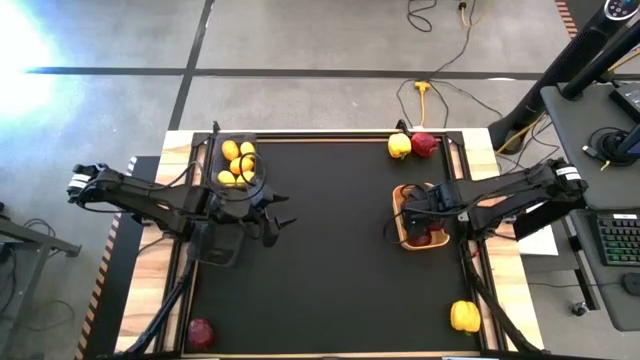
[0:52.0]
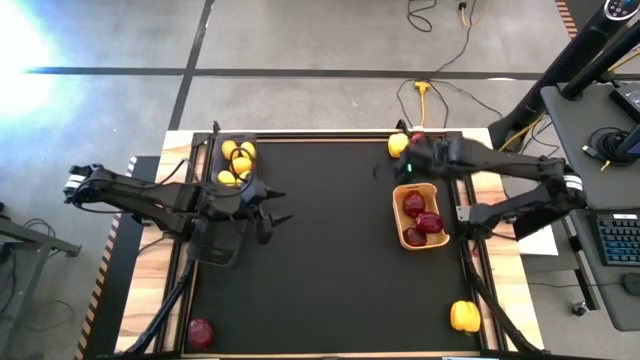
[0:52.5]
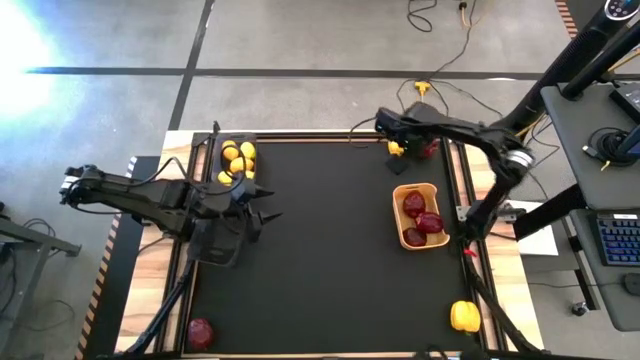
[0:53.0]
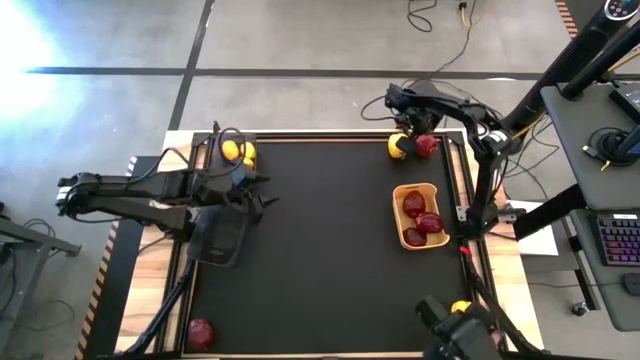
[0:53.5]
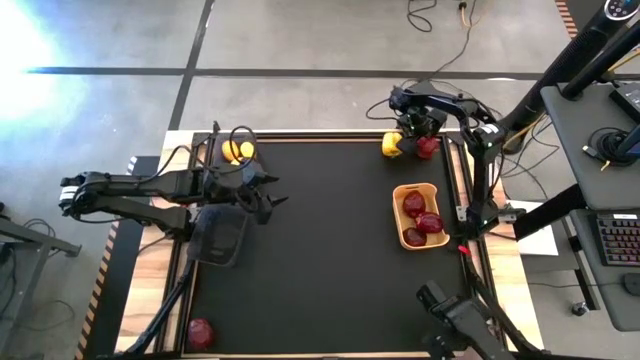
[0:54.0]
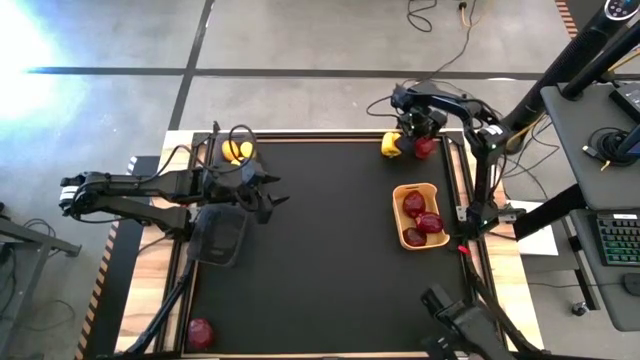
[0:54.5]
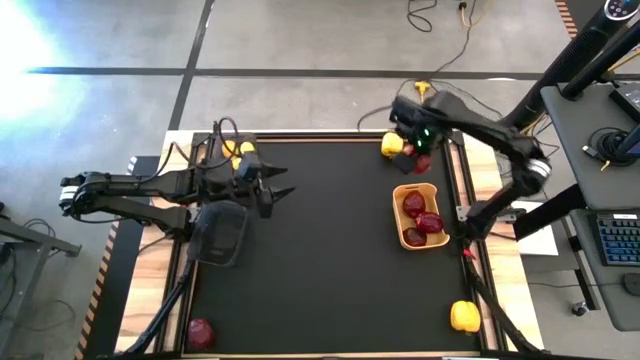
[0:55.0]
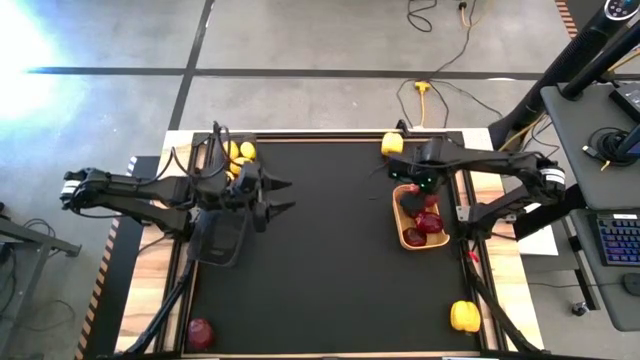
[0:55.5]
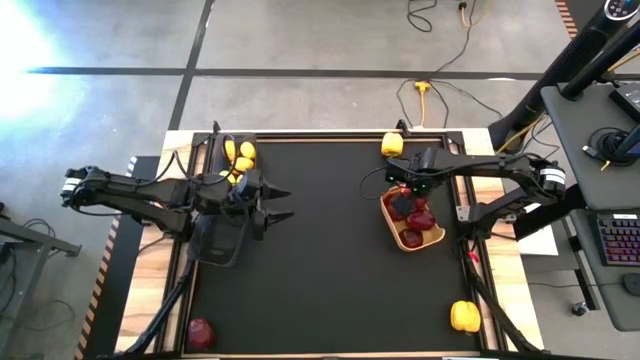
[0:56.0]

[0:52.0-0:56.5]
Task: Sort produce into baskets
Put the red apple into the yellow bin

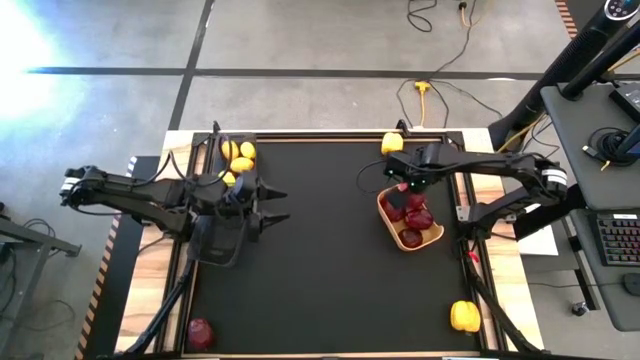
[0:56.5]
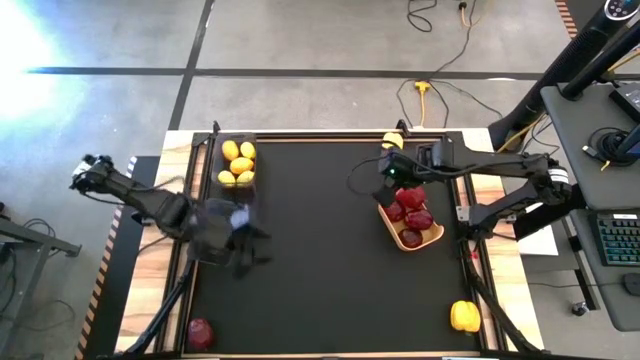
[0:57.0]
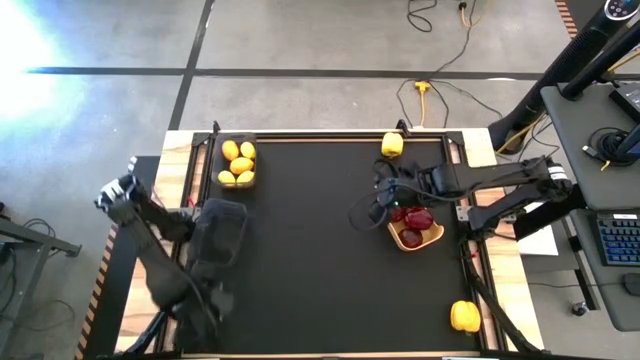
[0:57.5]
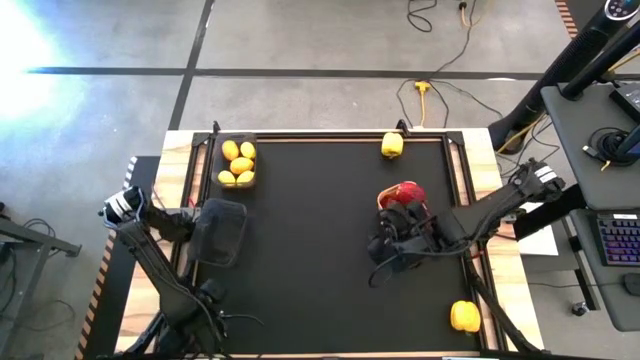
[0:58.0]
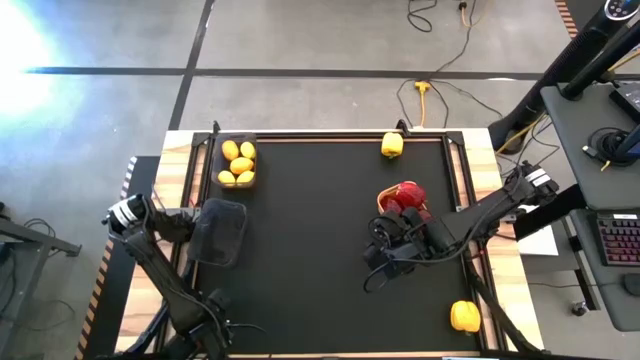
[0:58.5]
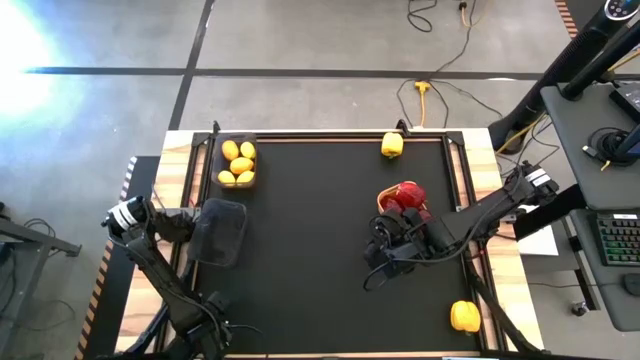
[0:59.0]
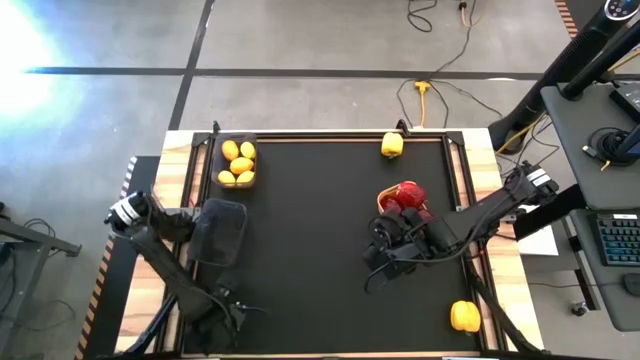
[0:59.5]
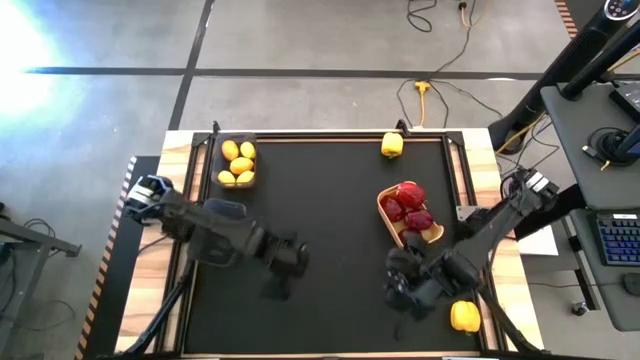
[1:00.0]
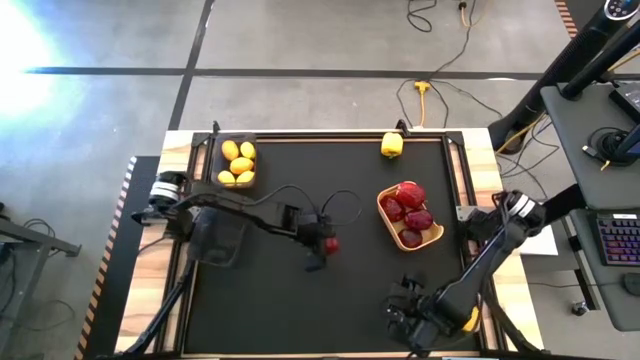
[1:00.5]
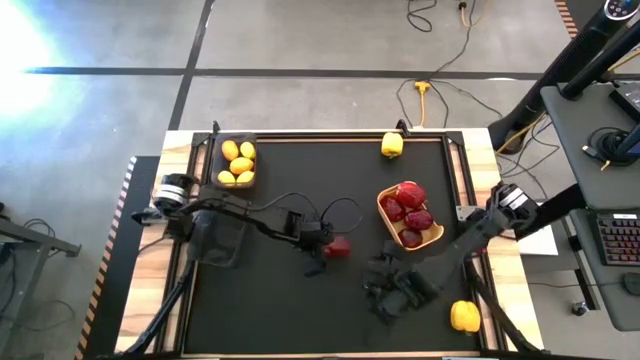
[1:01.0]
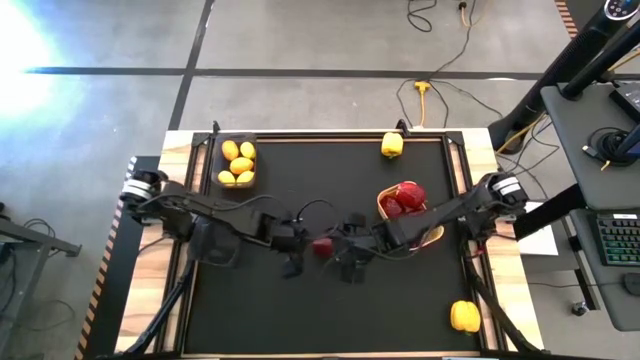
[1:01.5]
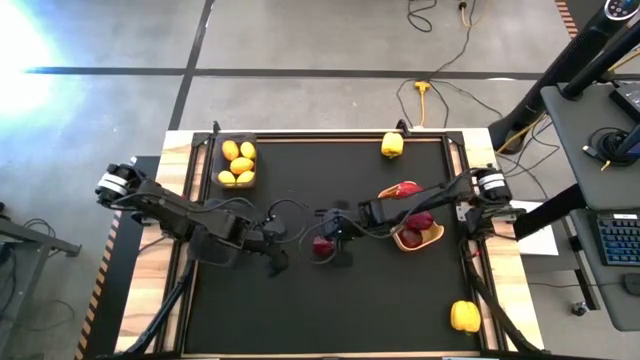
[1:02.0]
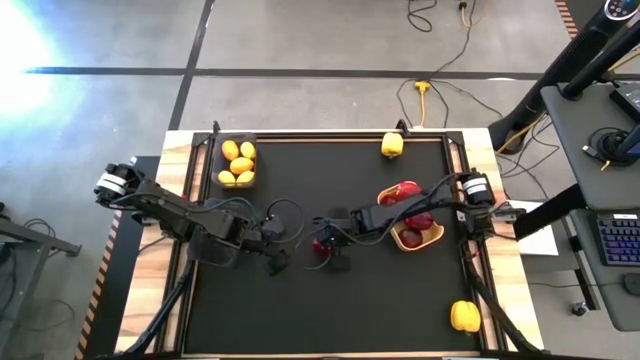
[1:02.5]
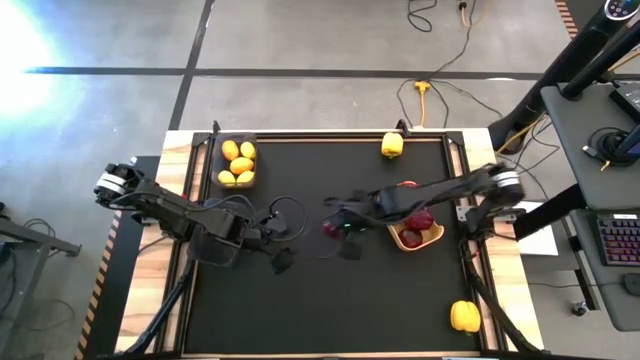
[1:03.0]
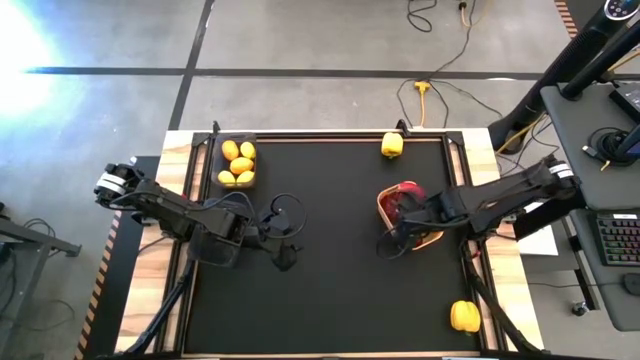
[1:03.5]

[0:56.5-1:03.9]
Put the red apple into the yellow bin

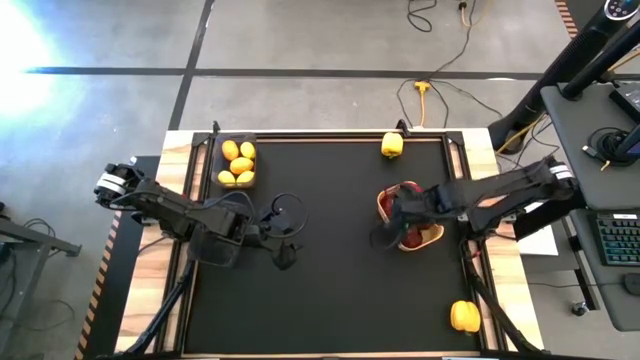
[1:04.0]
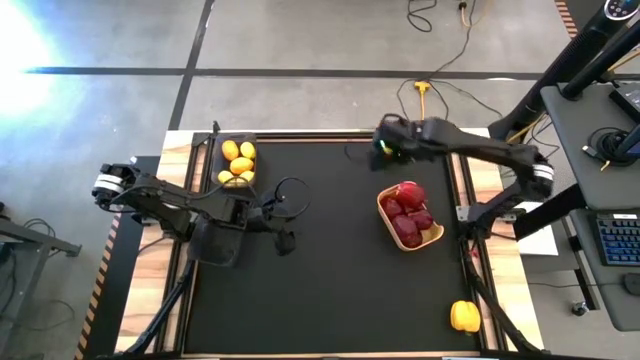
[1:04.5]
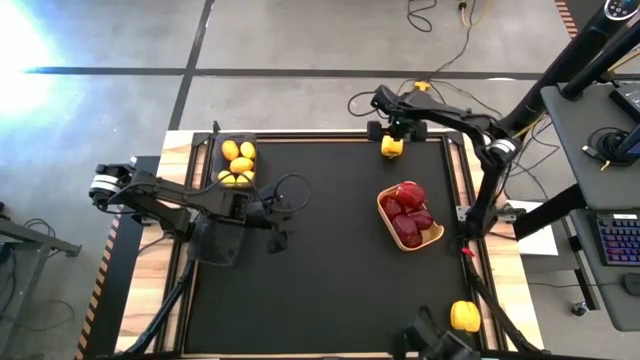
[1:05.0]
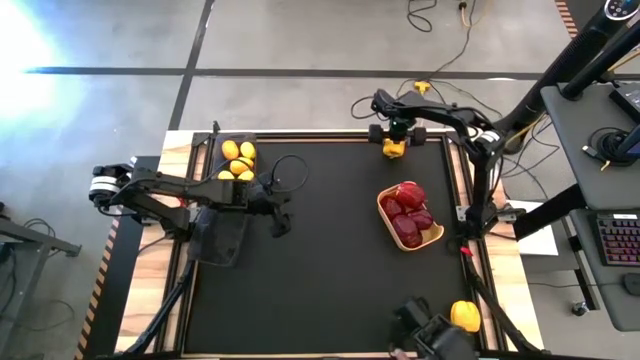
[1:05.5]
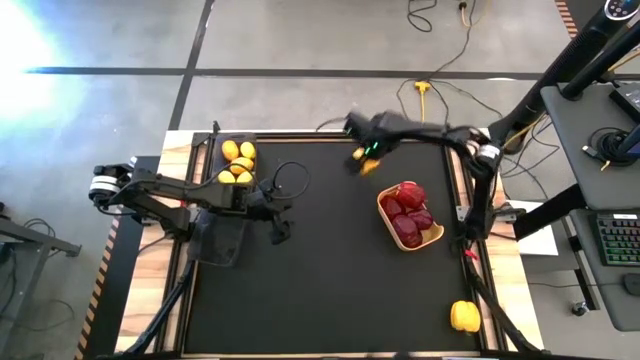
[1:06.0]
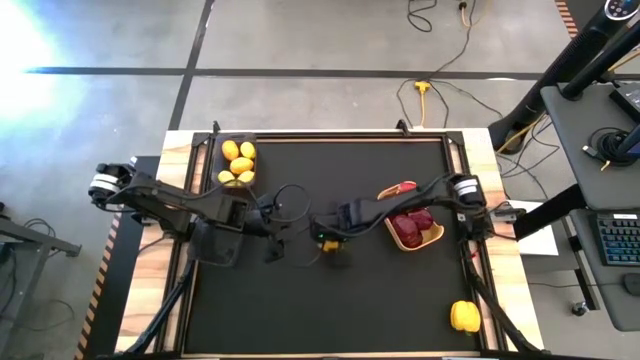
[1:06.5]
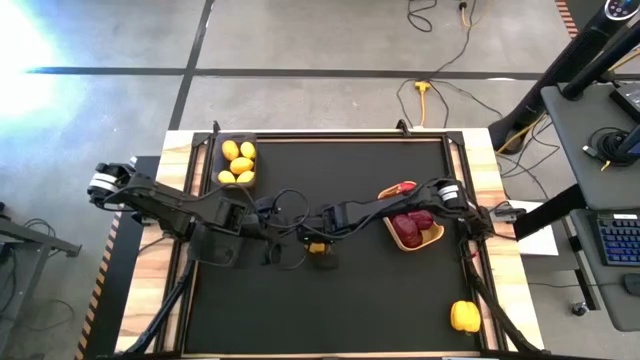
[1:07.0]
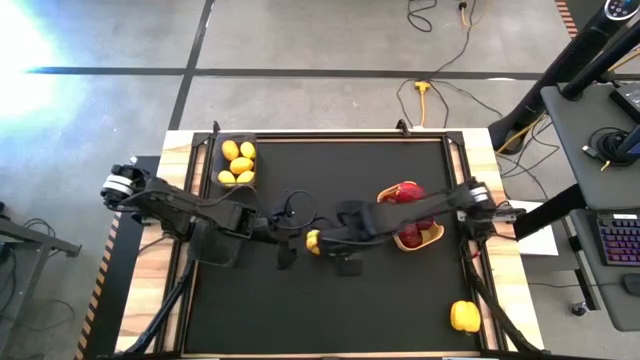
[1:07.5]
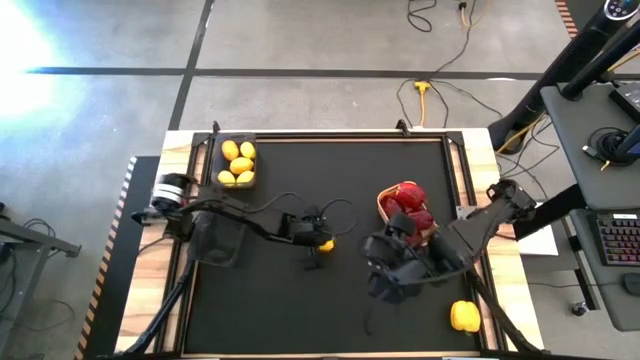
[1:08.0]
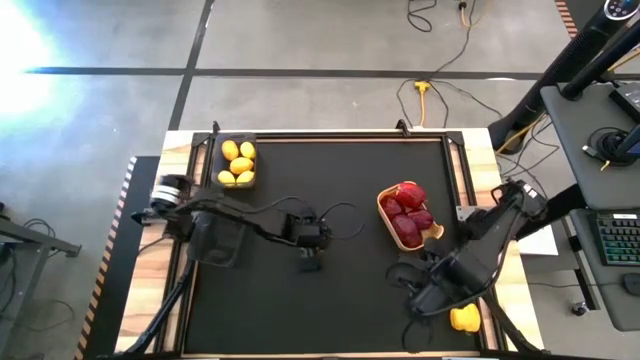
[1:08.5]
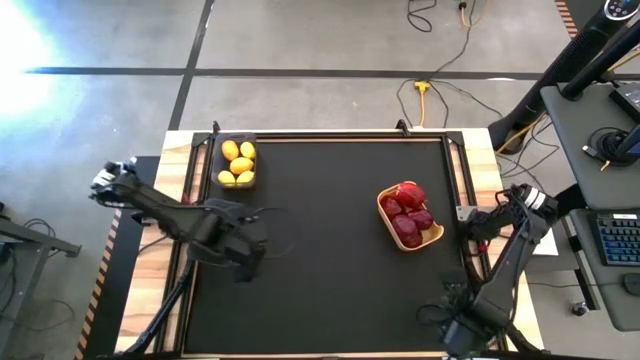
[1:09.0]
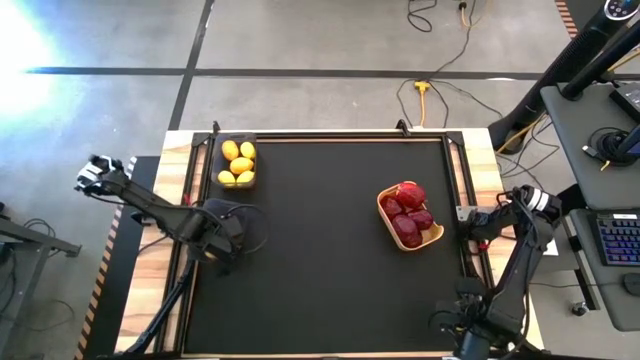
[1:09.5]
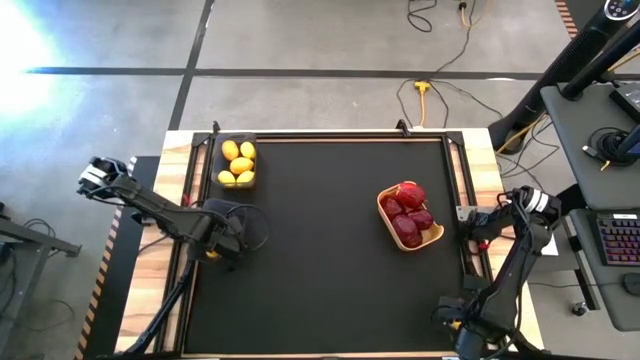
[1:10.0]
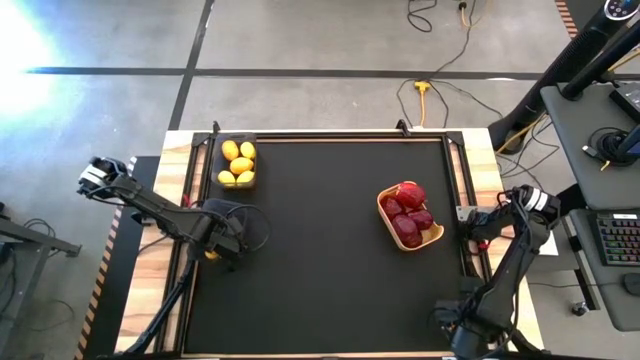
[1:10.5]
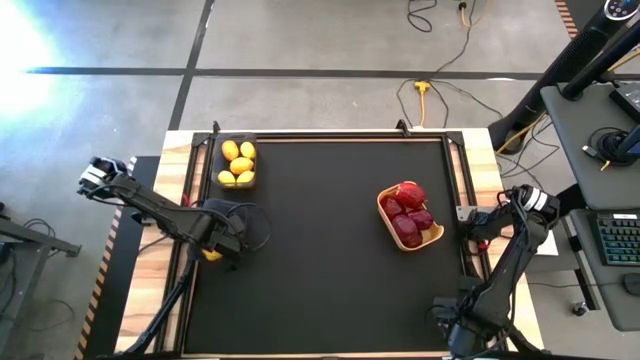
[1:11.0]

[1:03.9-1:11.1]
Put the yellow bell pepper into the bottom black bin

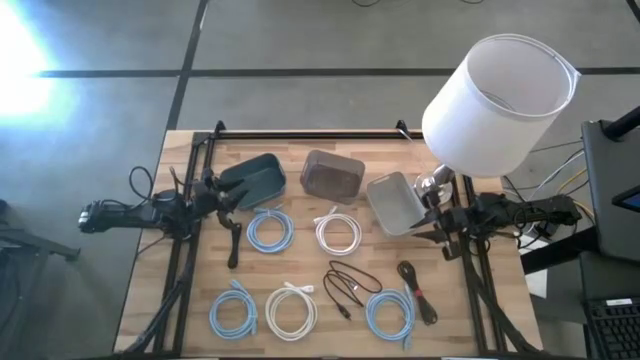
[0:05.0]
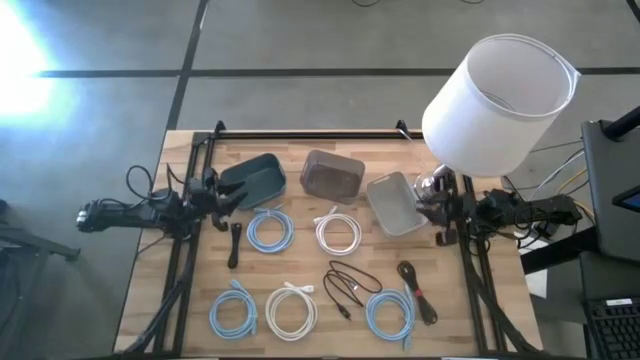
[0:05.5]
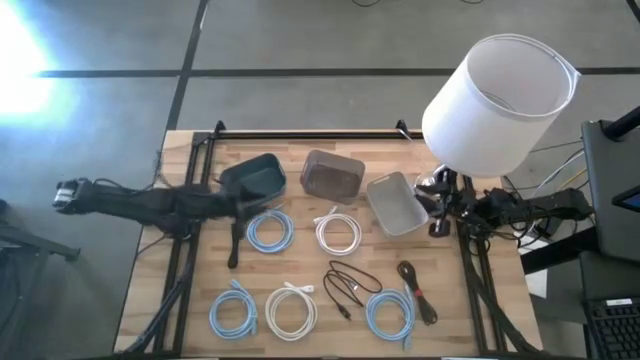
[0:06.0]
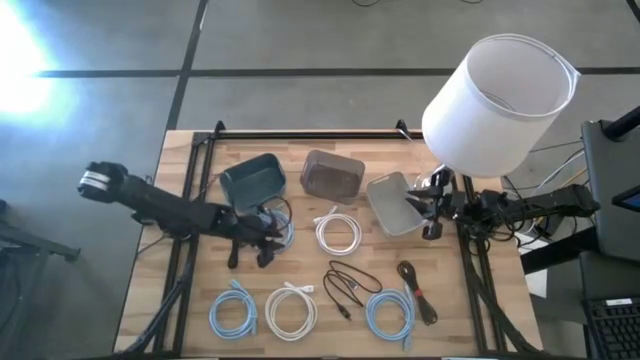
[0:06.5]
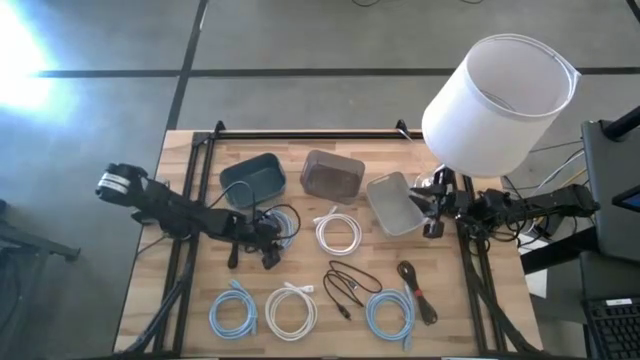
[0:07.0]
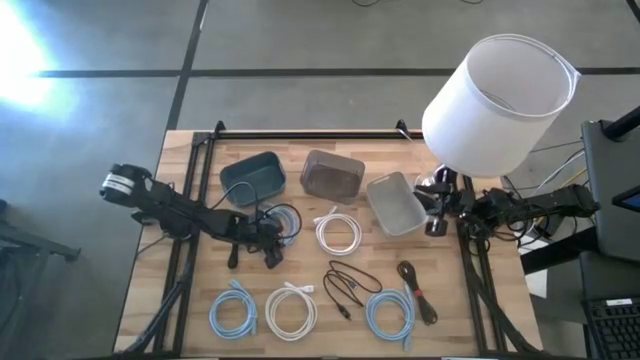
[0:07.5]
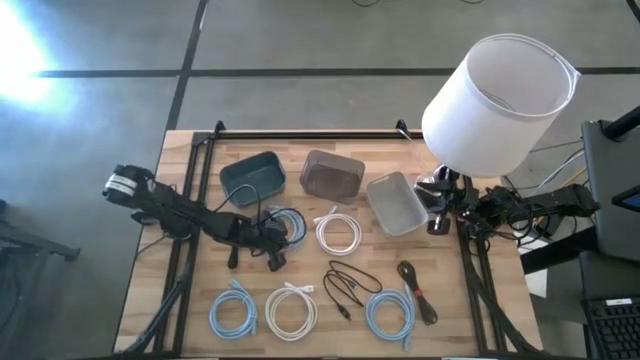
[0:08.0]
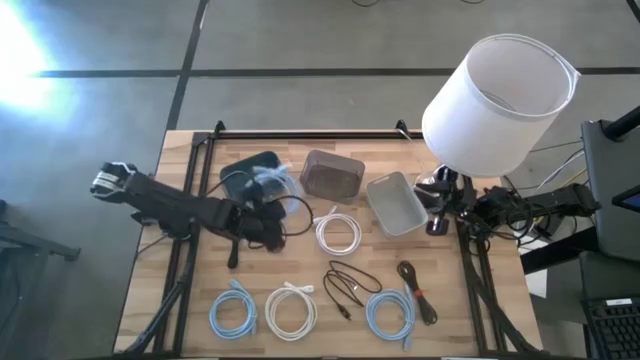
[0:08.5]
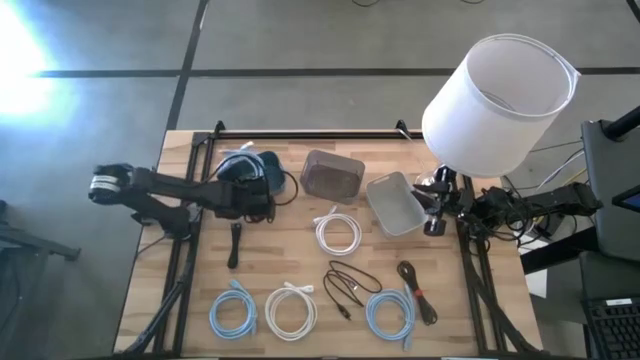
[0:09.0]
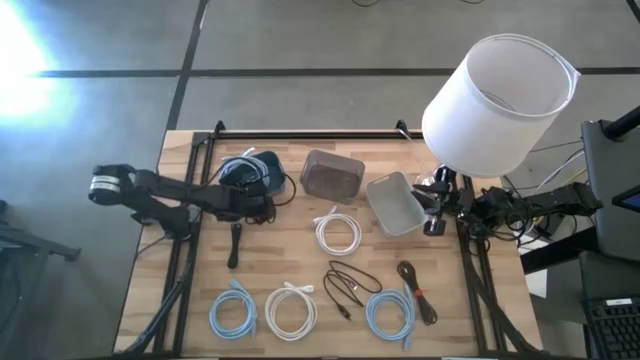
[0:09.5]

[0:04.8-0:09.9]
Task: Pick & Place USB Port
Put the top blue HDMI cable into the green bin
